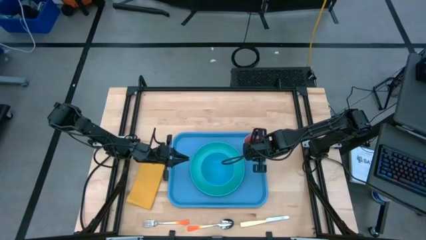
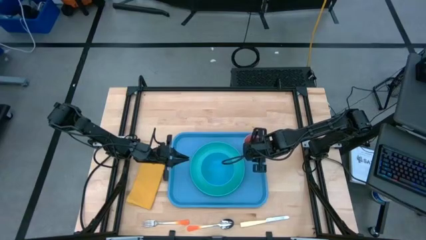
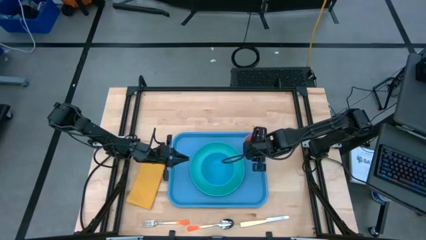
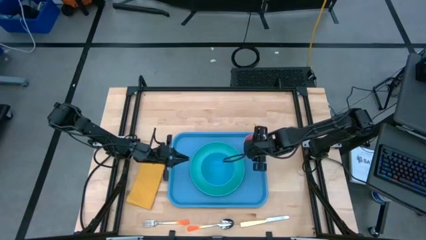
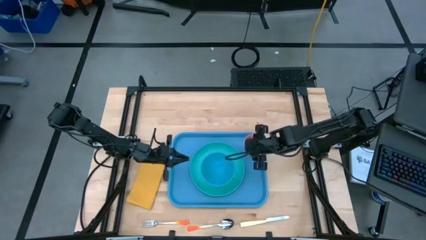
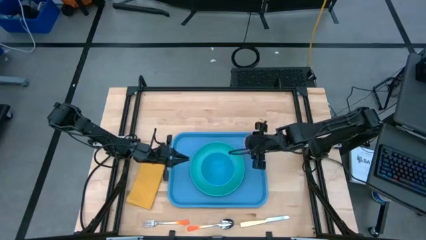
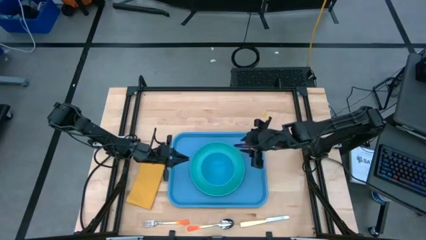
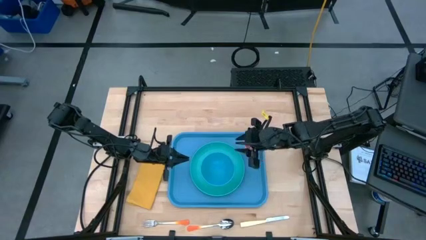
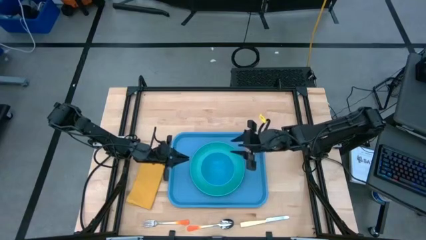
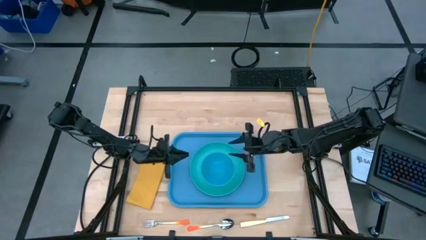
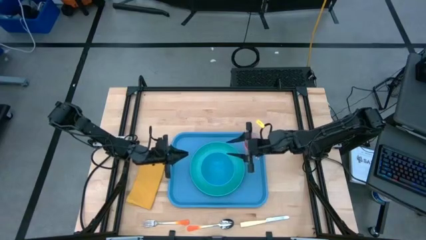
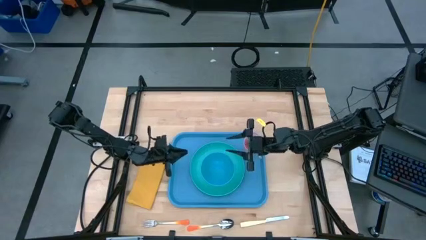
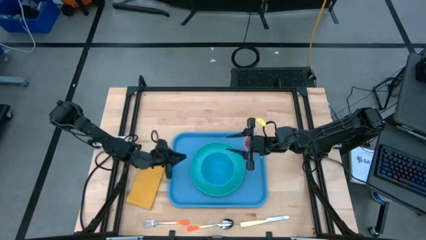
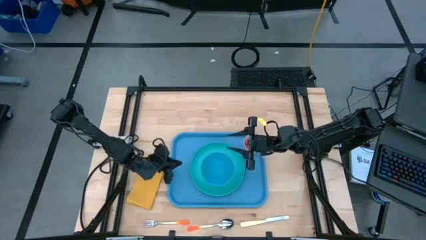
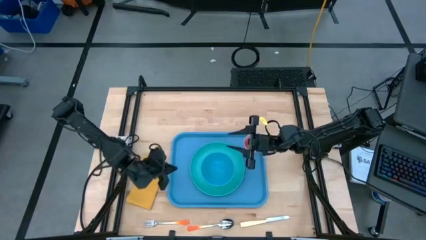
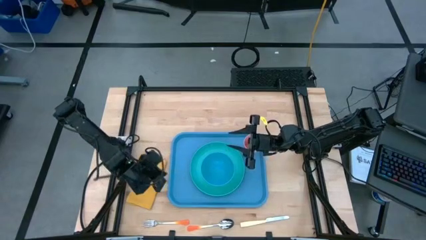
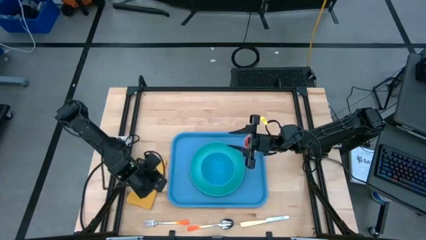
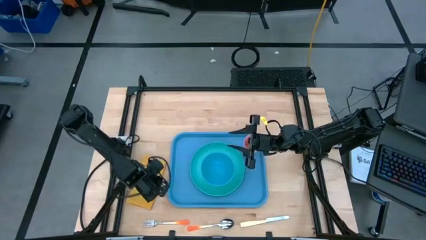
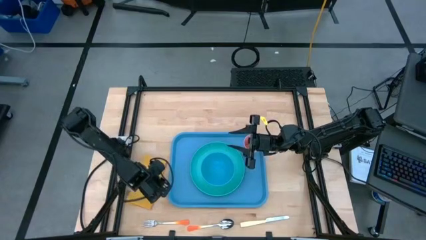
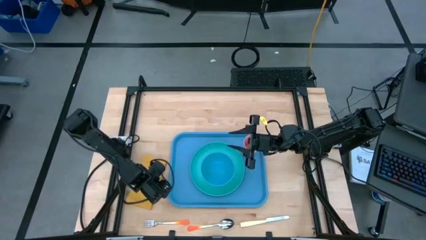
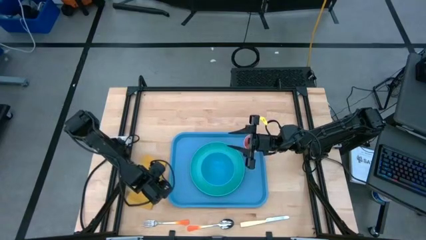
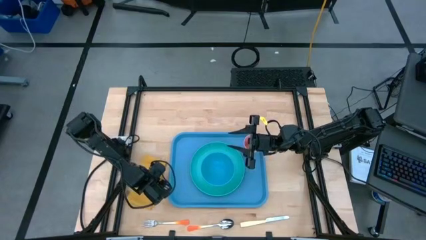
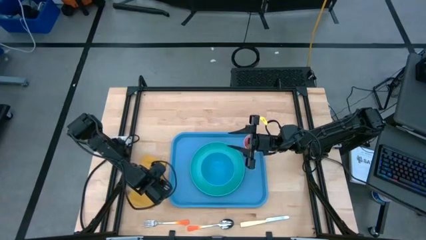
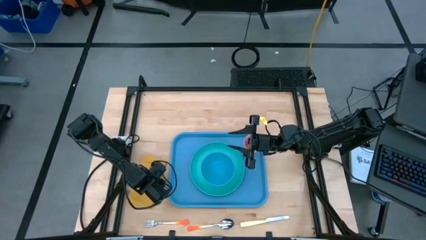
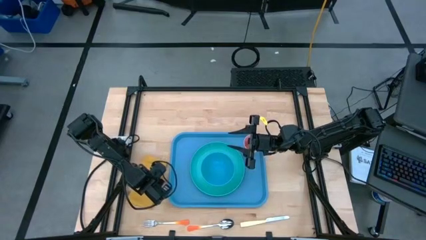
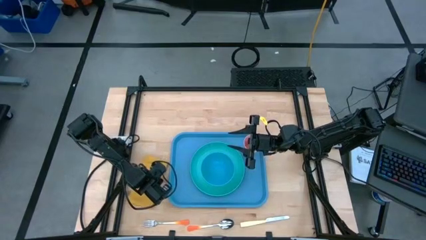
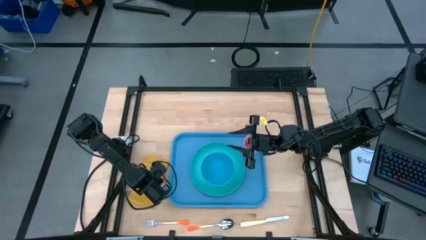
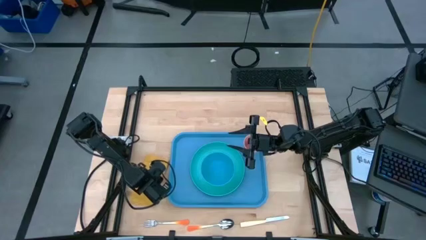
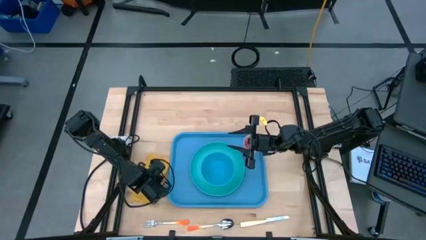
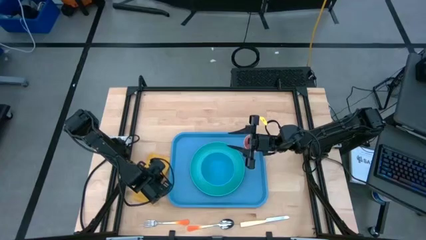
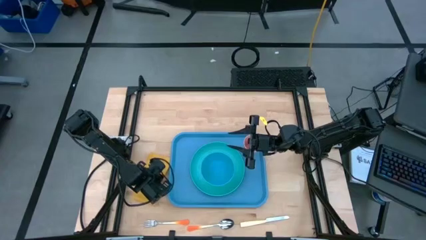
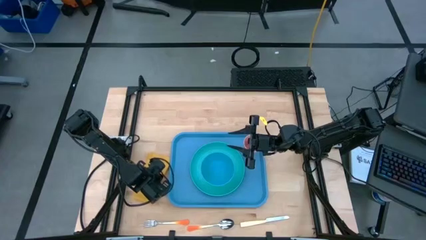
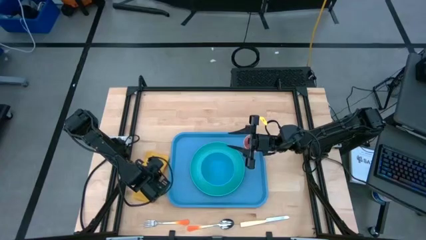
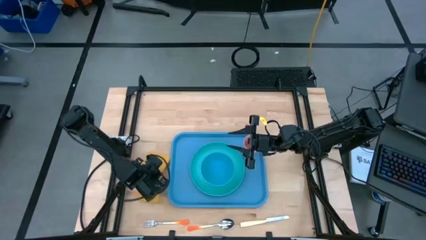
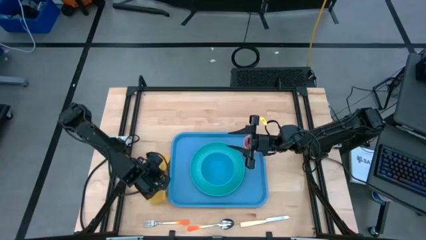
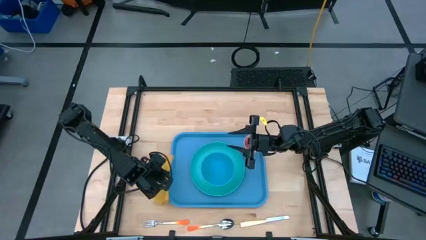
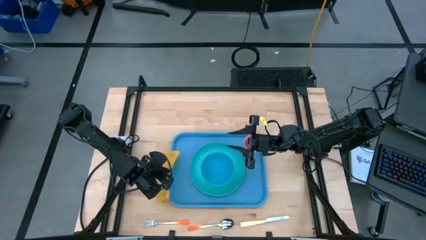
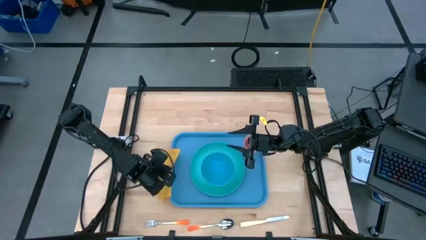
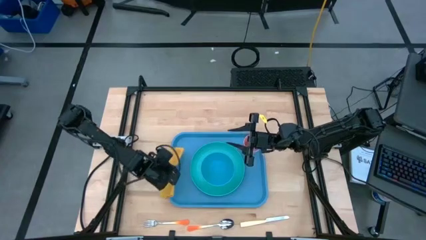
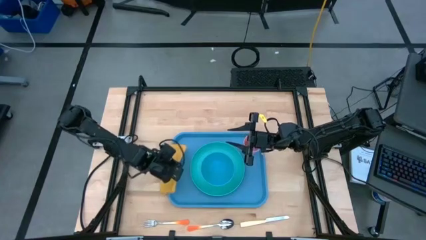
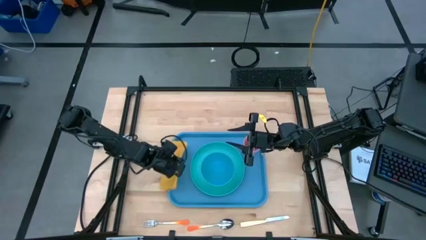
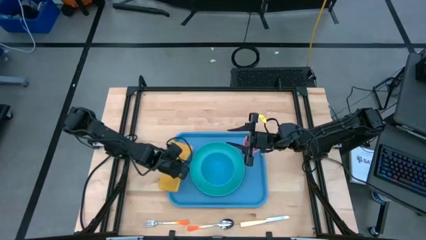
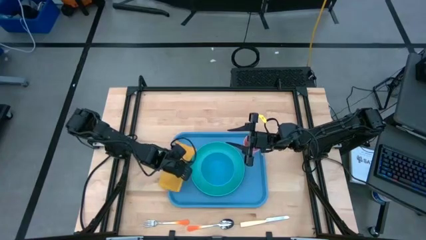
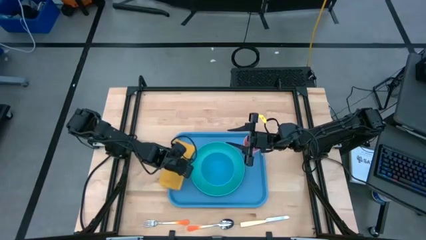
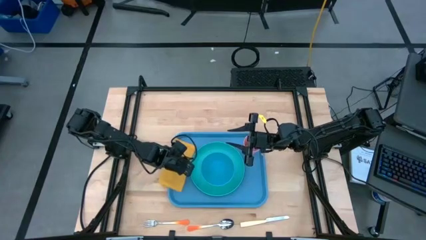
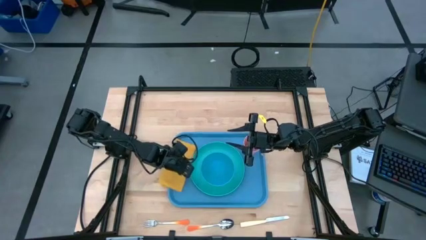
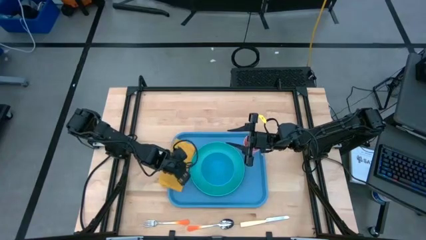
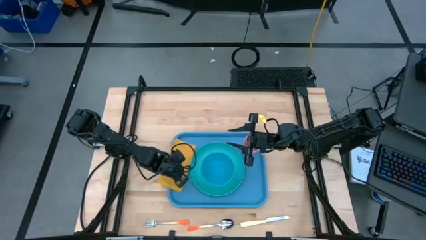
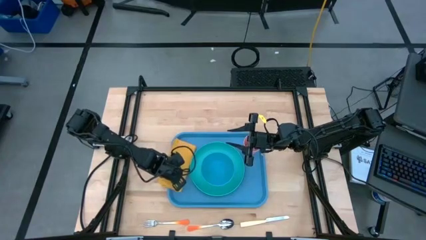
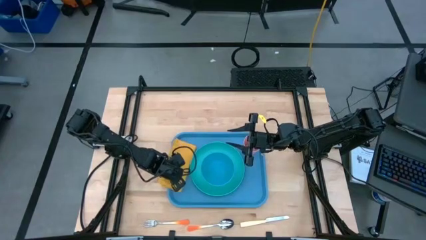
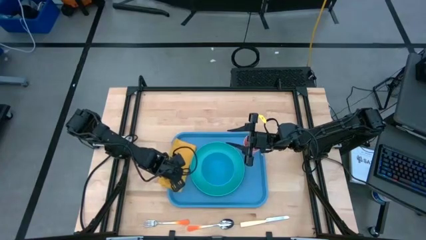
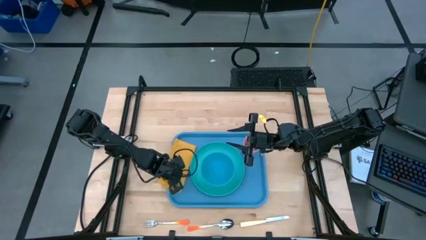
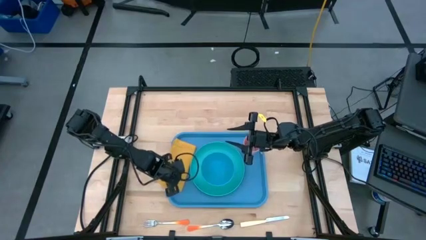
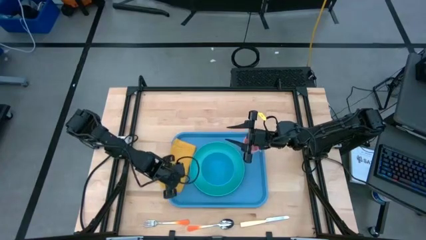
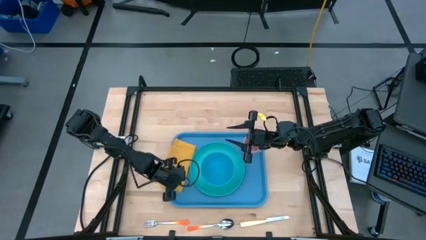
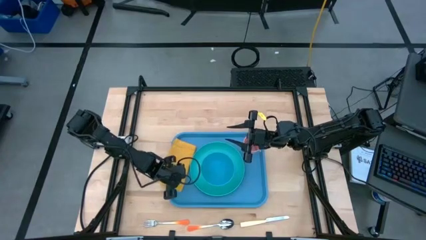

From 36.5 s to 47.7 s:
Task: Set up tray
Put the yellow napkin to the left of the blue tray

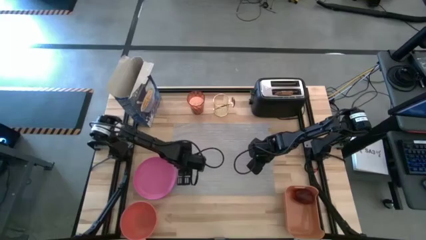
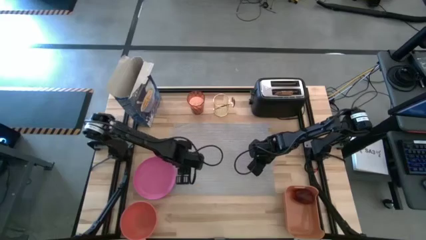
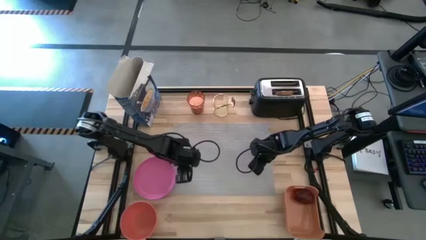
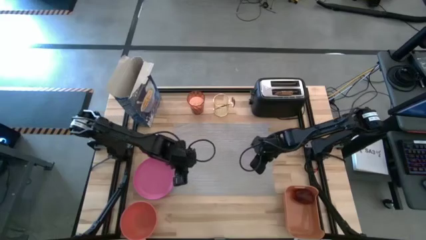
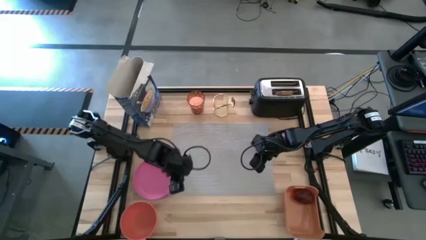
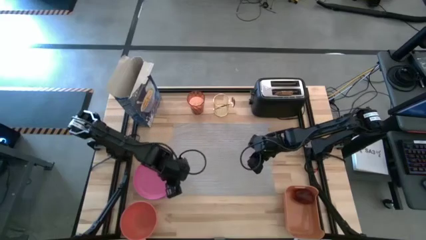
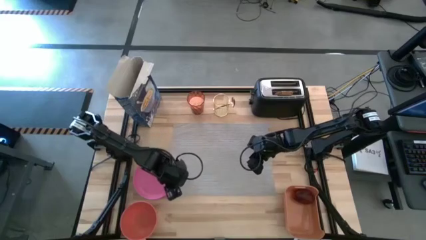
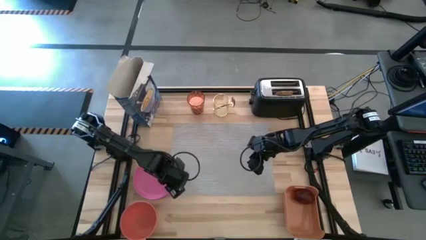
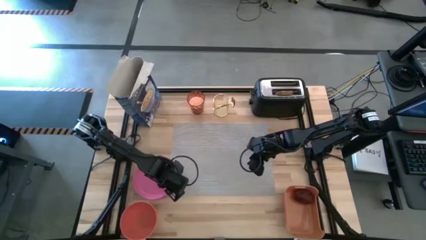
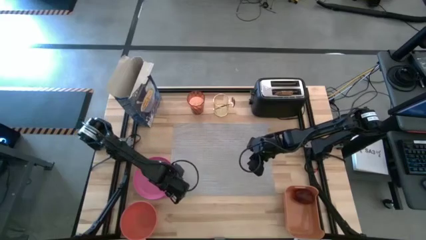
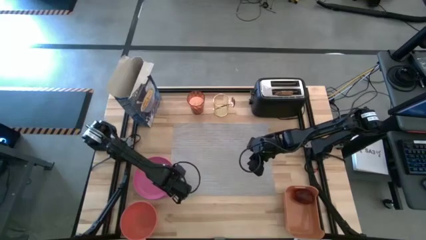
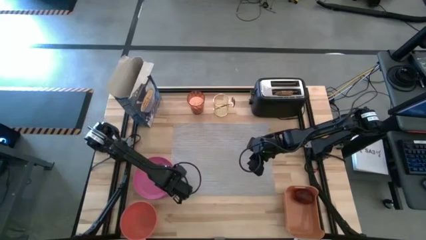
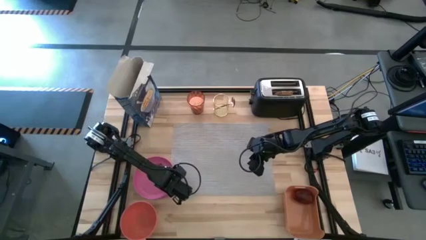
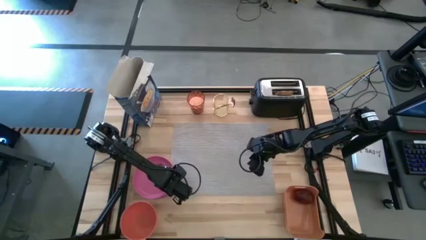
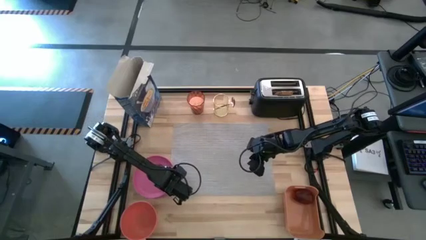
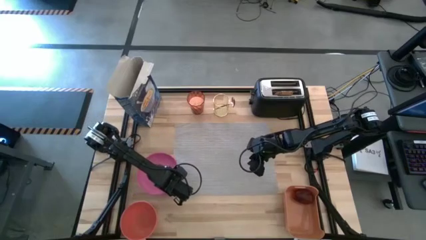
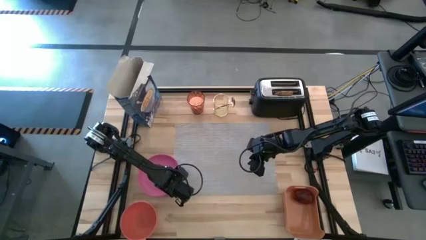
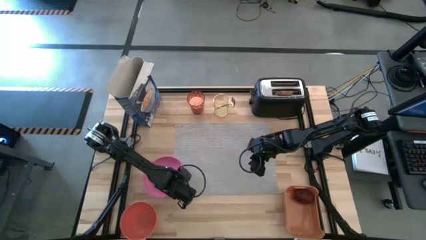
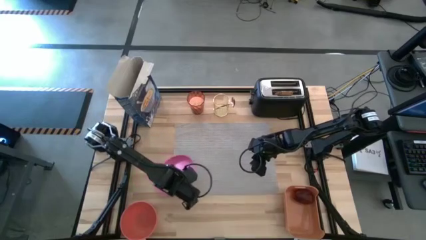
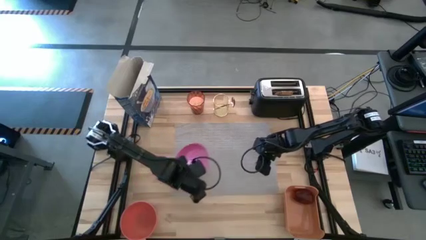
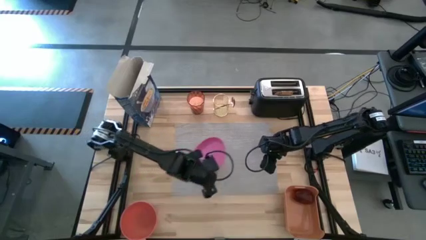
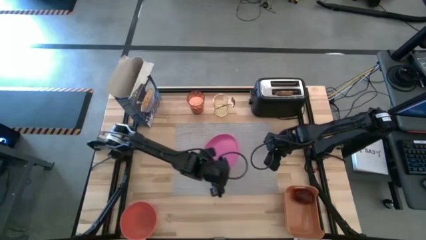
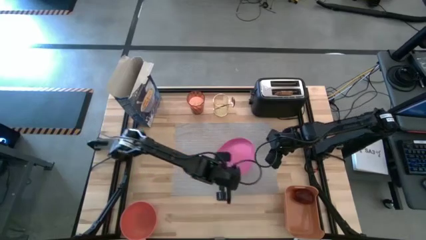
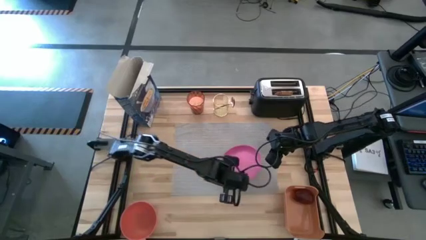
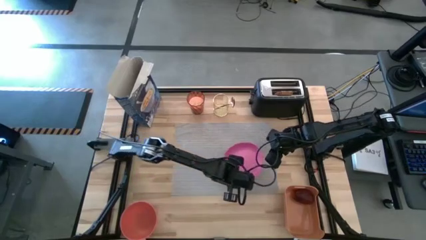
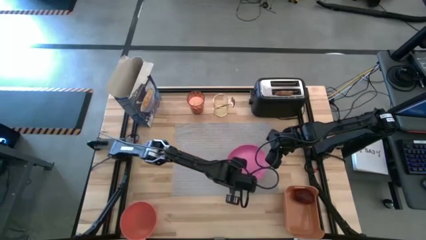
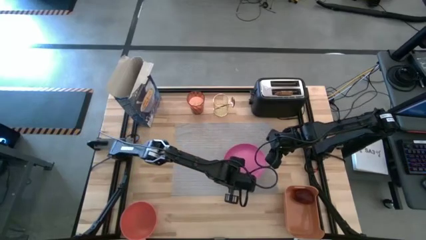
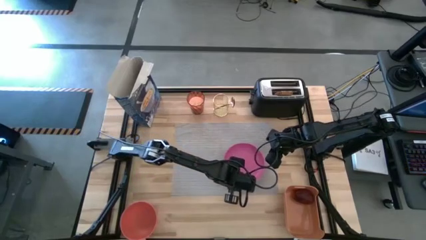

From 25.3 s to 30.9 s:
Task: Arrange a breakfast setting
Put the pink plate on the gray placemat
